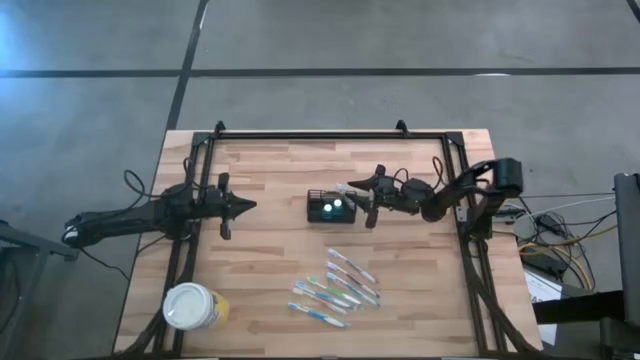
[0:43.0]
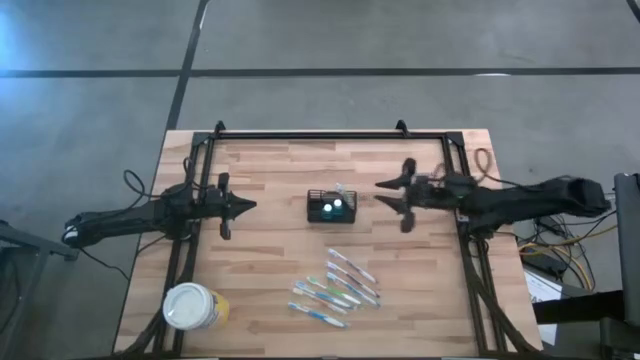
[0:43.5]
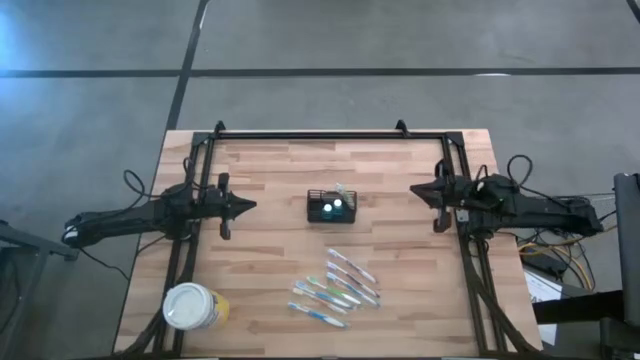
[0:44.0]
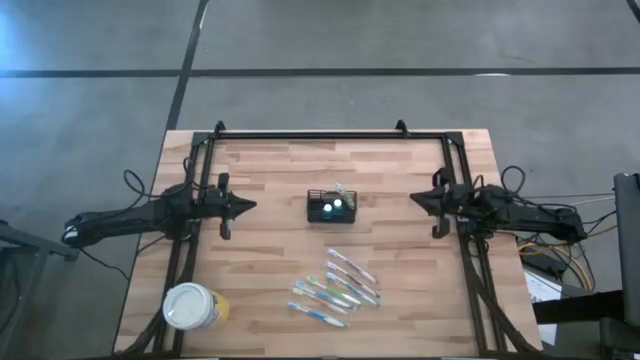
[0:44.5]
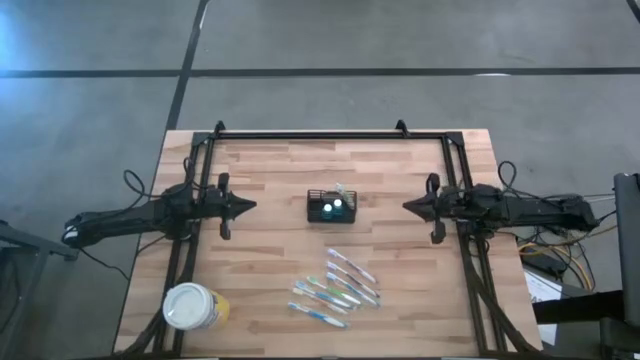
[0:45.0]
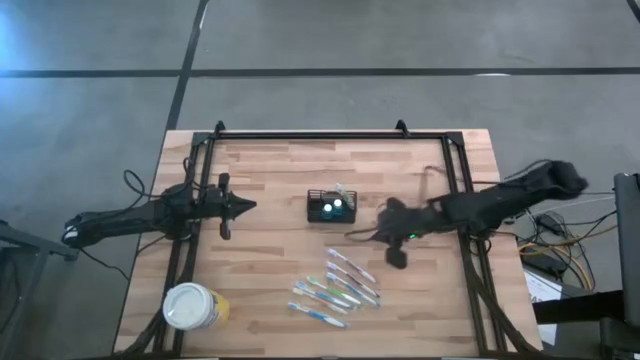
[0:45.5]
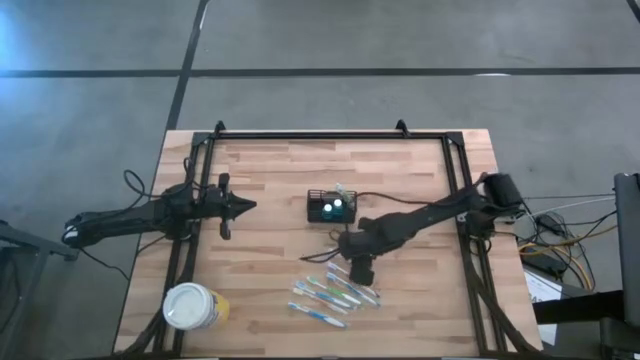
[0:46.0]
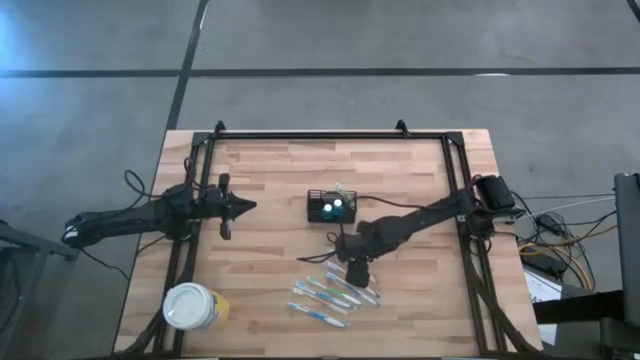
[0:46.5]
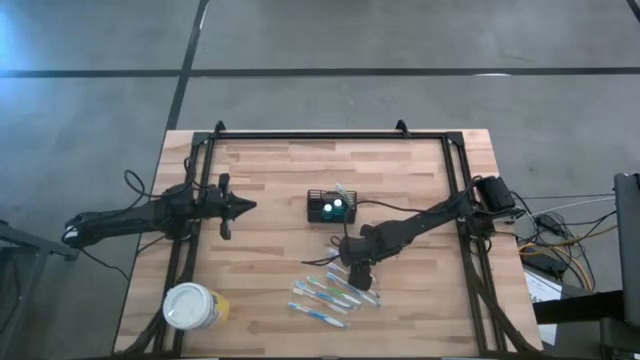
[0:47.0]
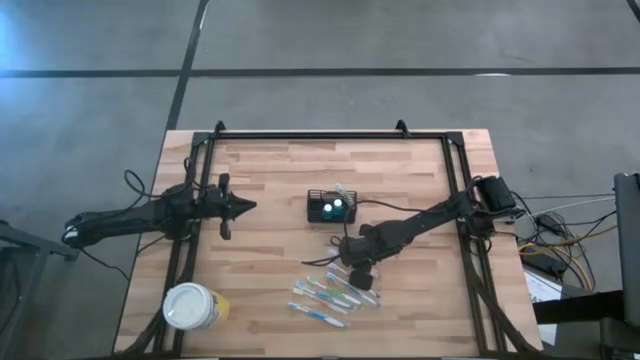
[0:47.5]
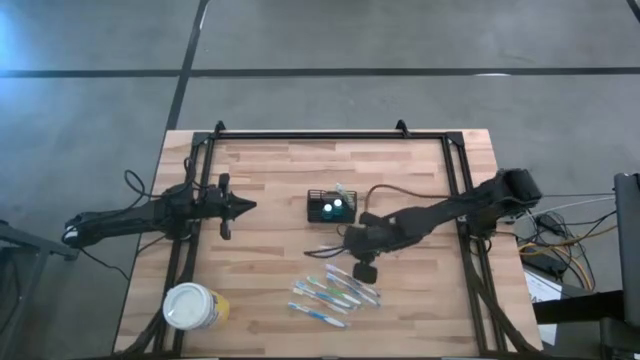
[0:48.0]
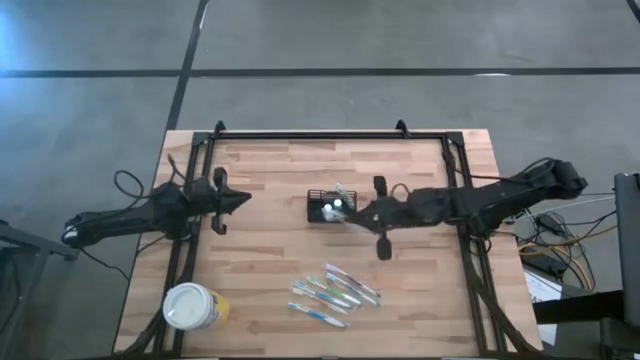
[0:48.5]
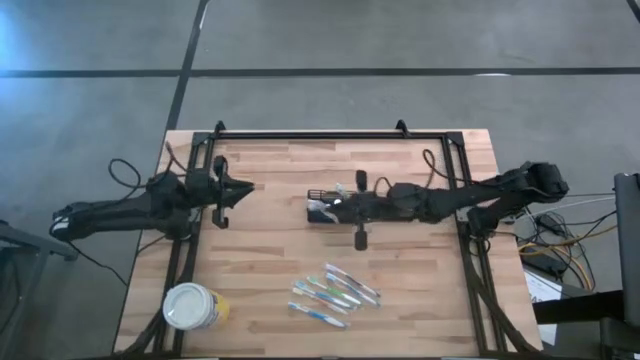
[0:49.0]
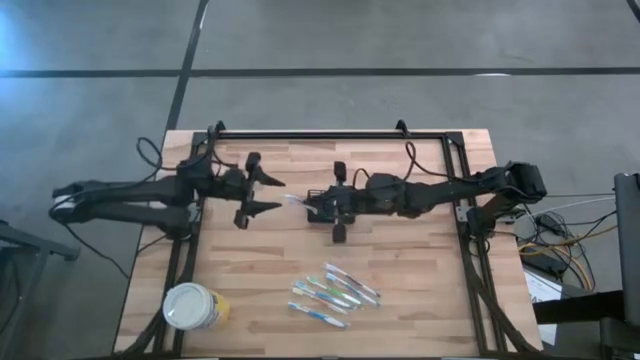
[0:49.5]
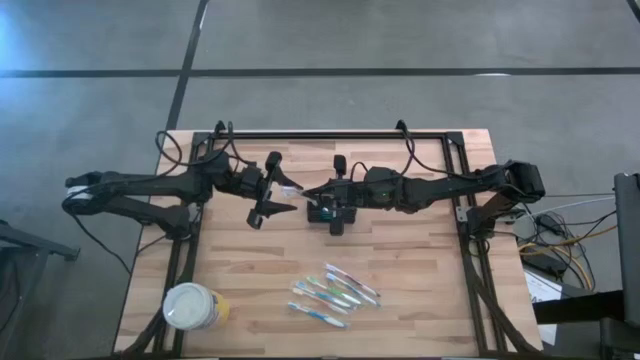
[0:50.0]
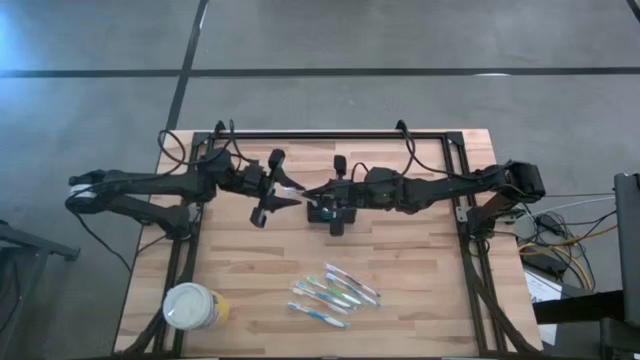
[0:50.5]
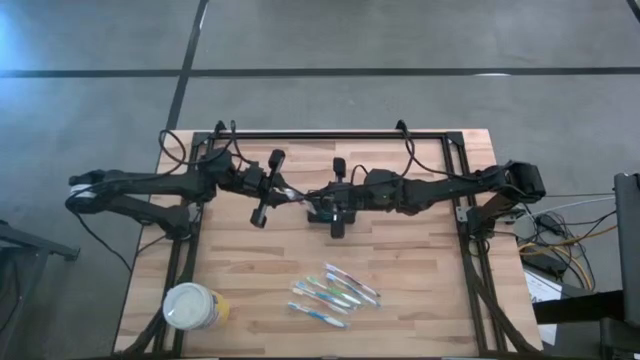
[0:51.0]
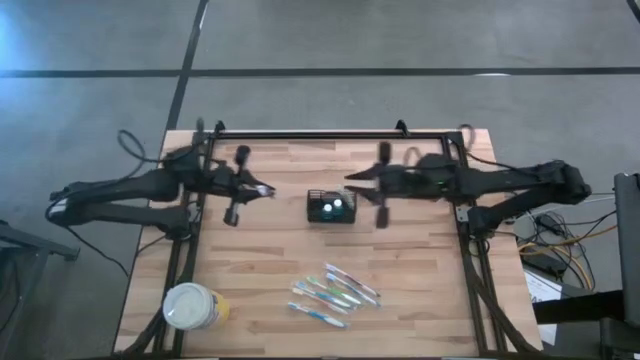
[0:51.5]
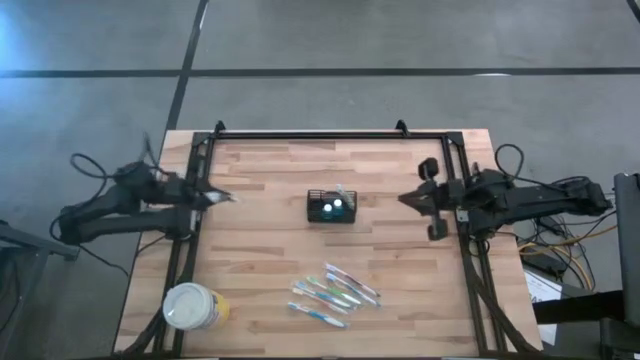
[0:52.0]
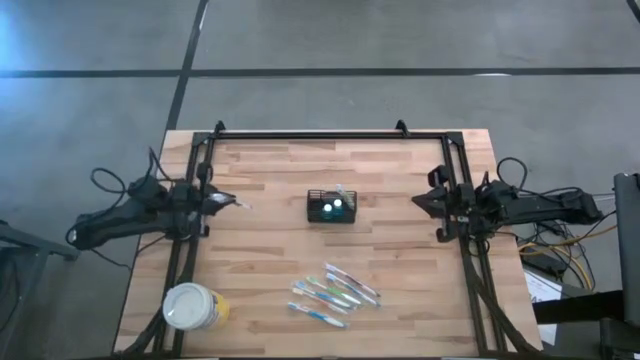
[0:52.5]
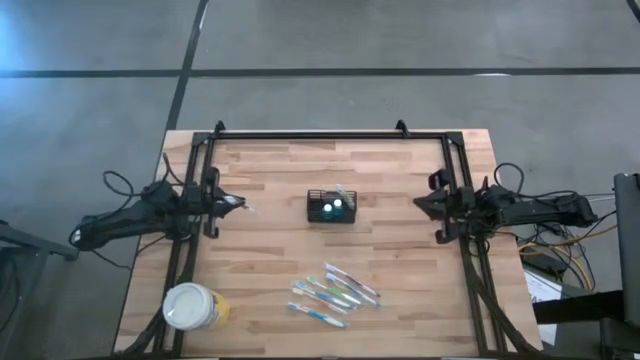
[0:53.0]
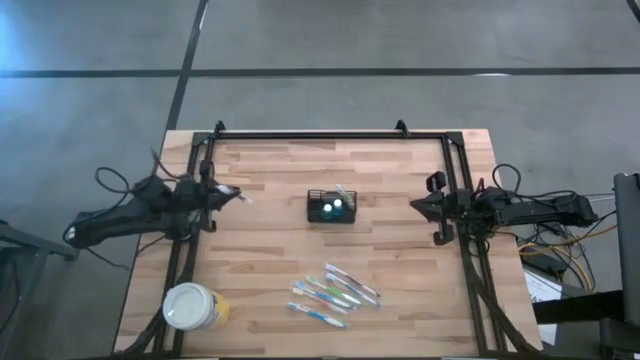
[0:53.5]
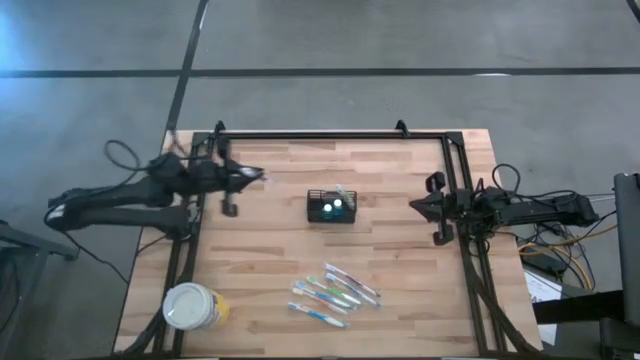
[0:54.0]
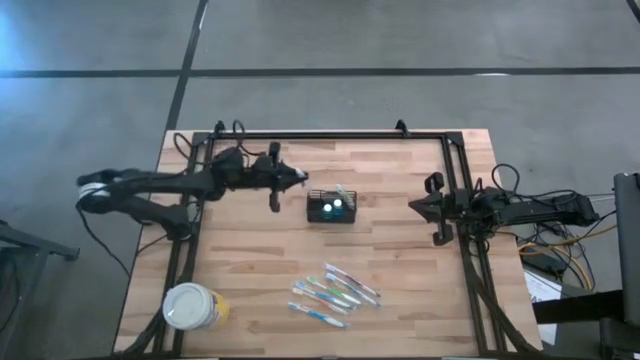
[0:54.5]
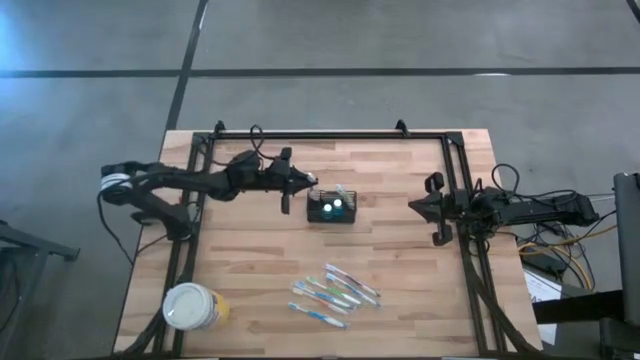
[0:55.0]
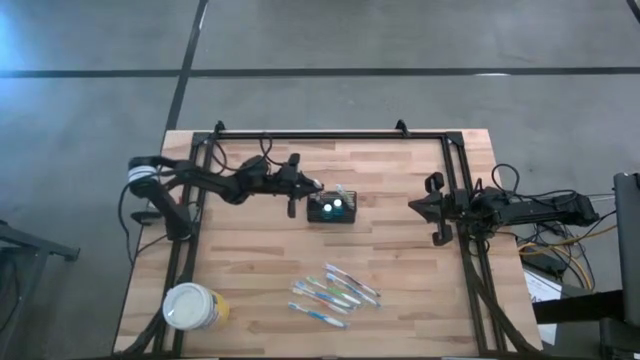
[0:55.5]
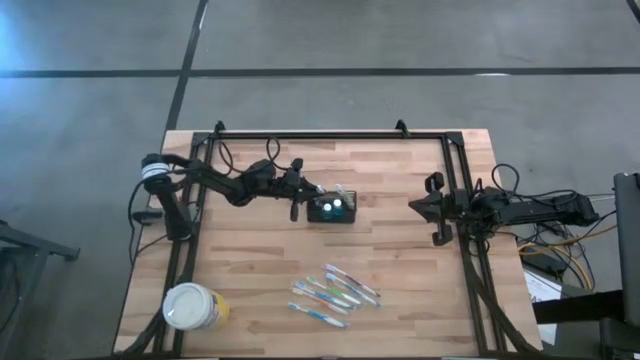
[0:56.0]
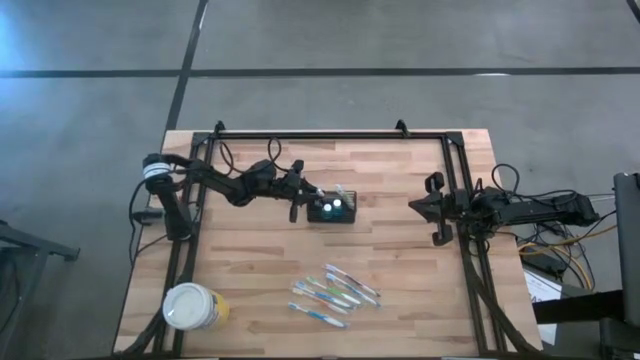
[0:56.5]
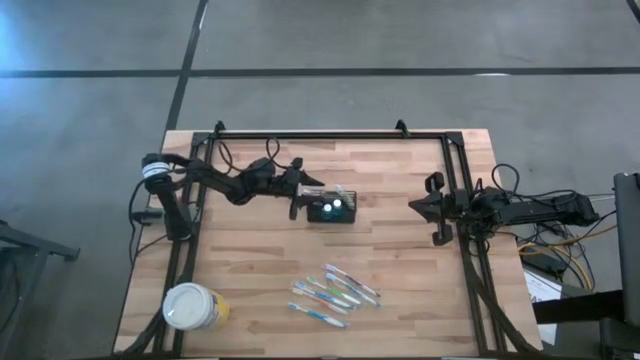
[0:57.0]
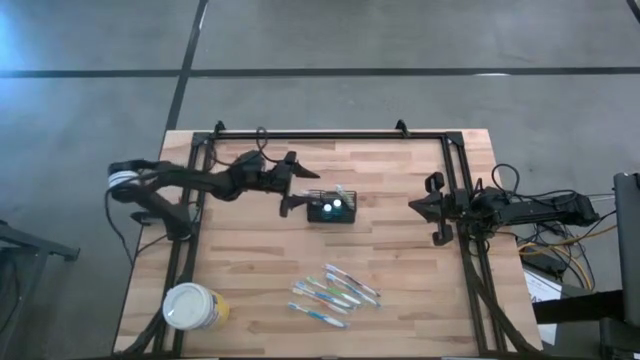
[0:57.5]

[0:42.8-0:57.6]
Task: Pick & Place toothbrushing station
Put the top purple toothbrush into the black organizer

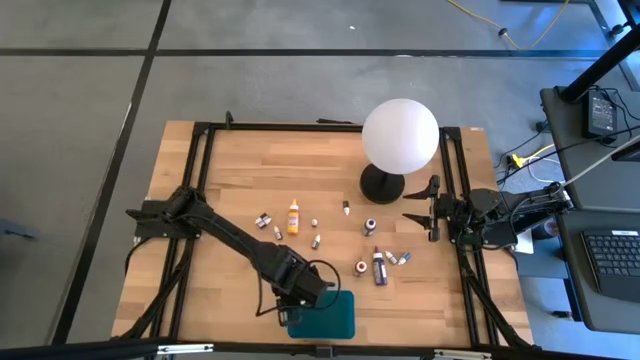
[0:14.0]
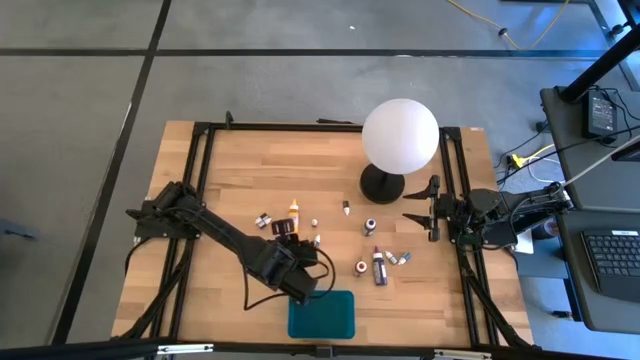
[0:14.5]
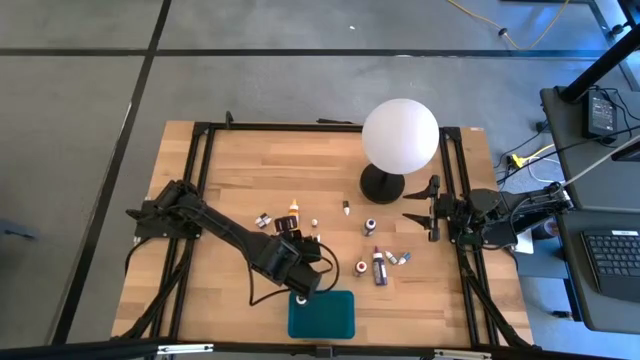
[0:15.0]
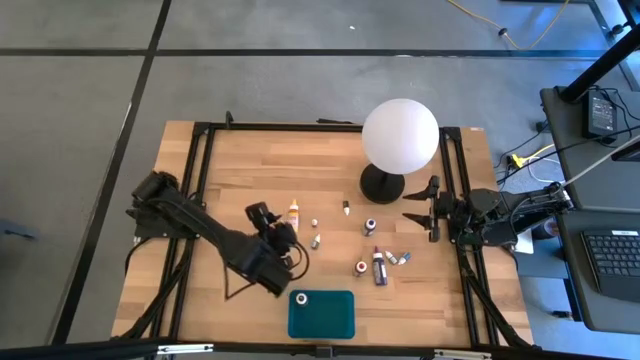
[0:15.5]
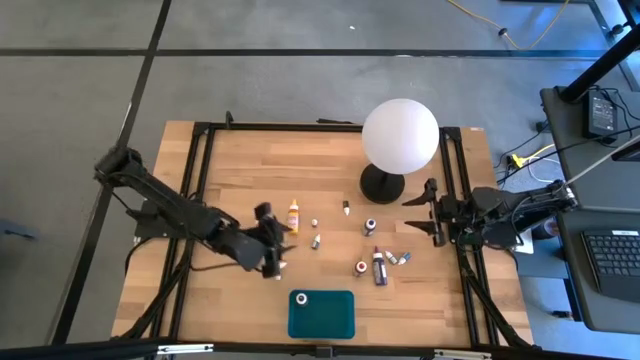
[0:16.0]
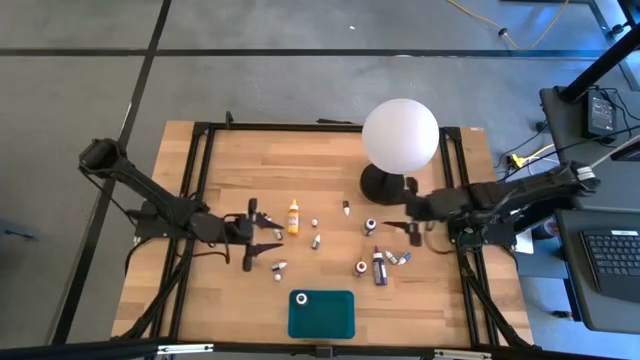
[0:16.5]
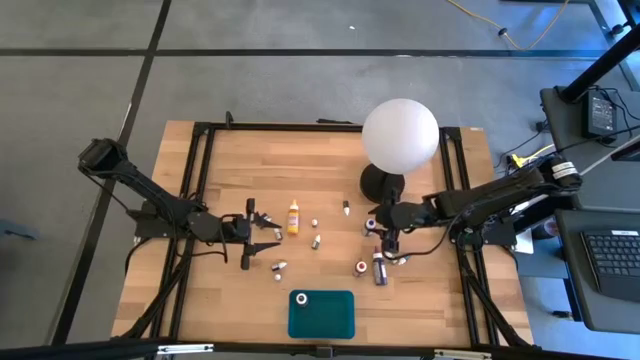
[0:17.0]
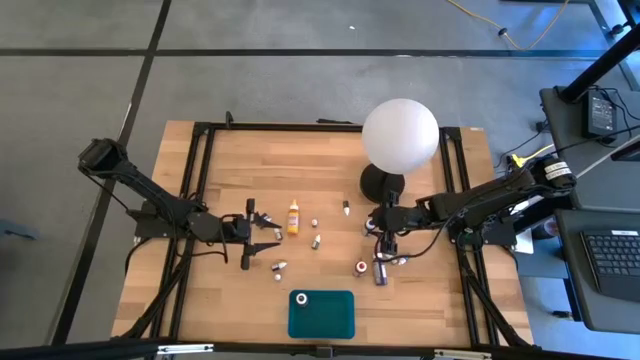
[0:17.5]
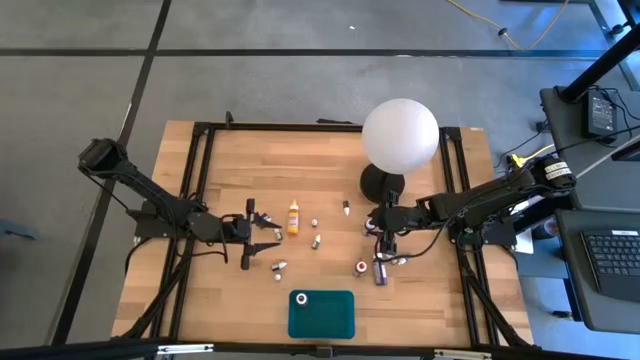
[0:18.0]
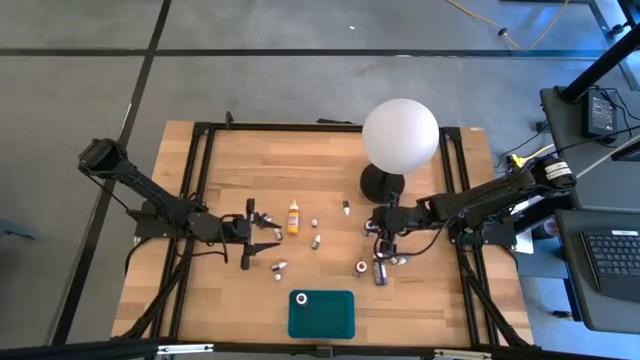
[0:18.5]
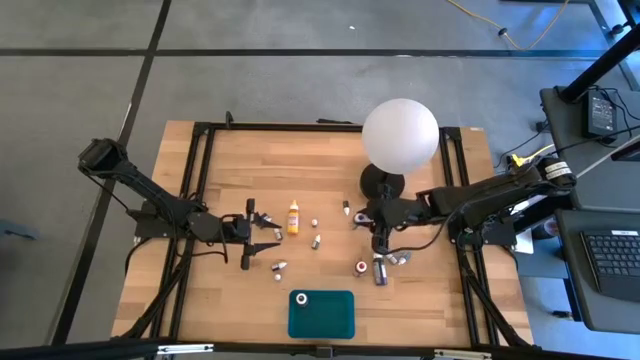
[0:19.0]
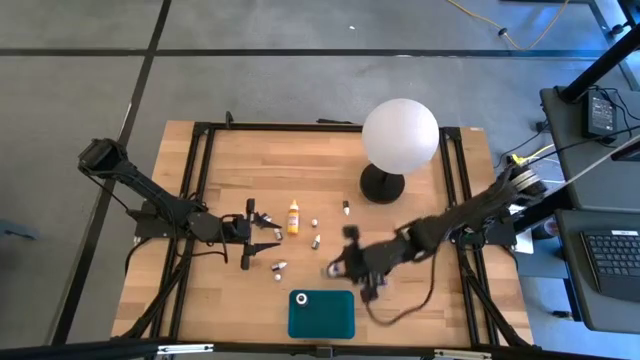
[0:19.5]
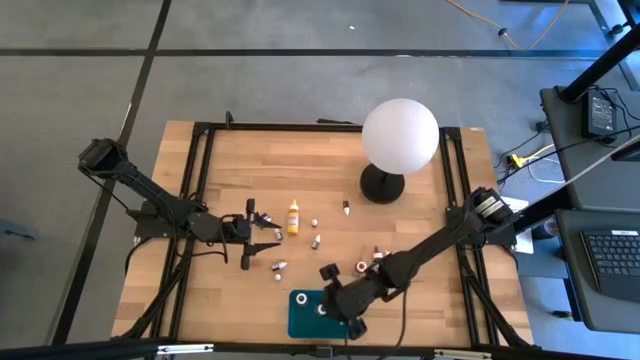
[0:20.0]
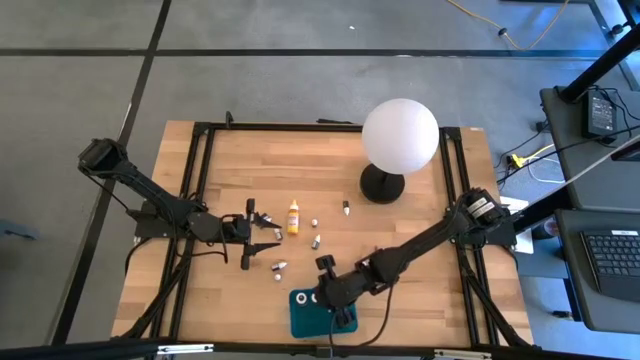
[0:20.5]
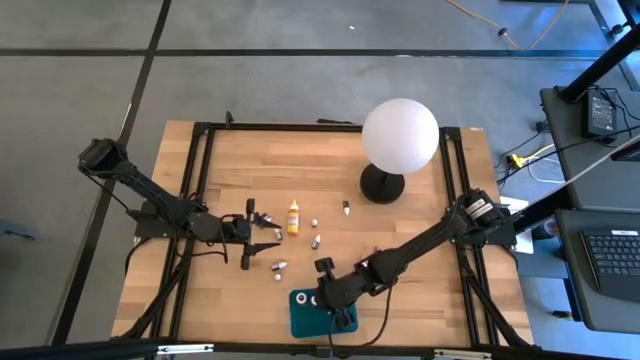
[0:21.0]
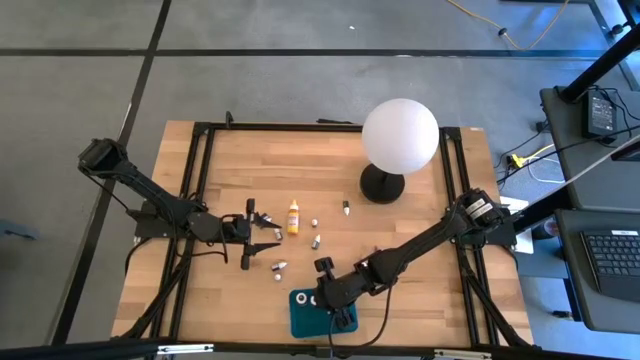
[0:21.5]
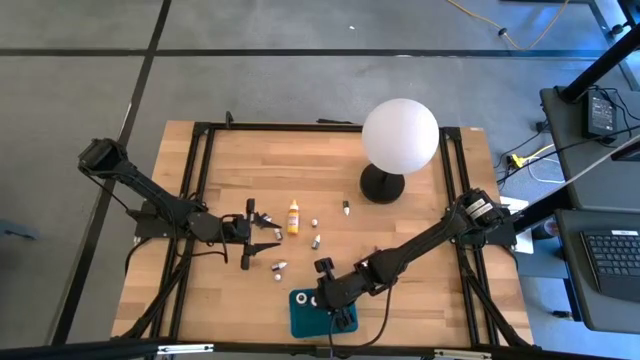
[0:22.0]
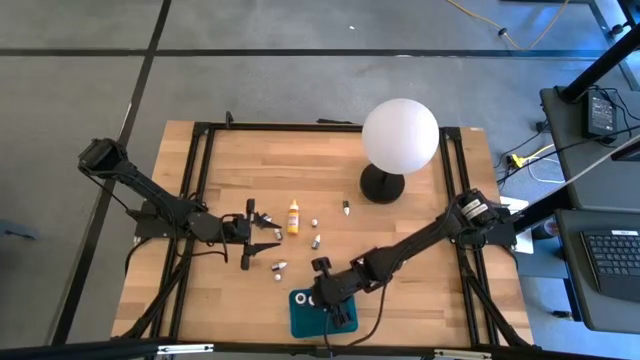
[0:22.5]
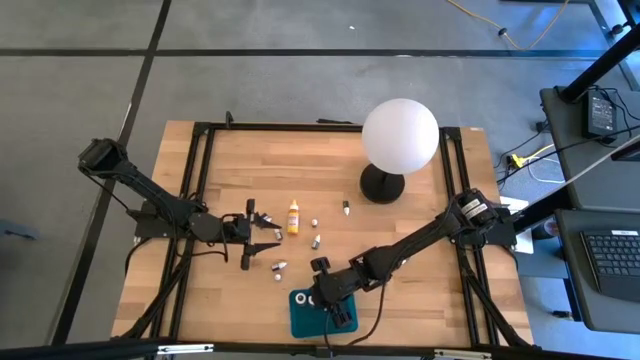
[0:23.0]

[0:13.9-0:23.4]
Task: Pick & Place food coloring
Put the large blue food coloring bottle into the blue bin
